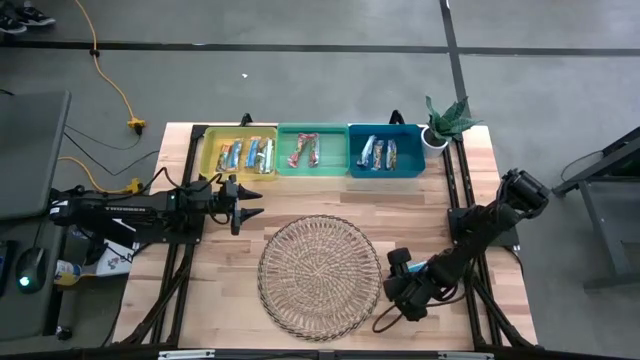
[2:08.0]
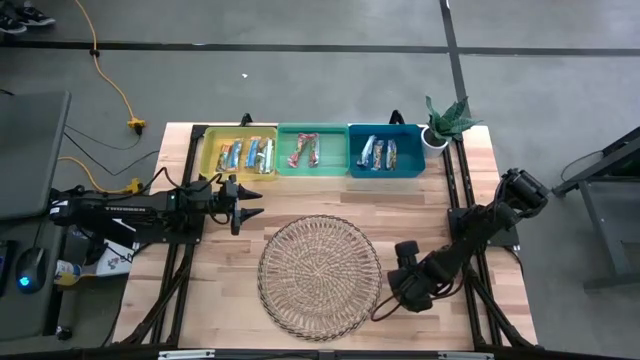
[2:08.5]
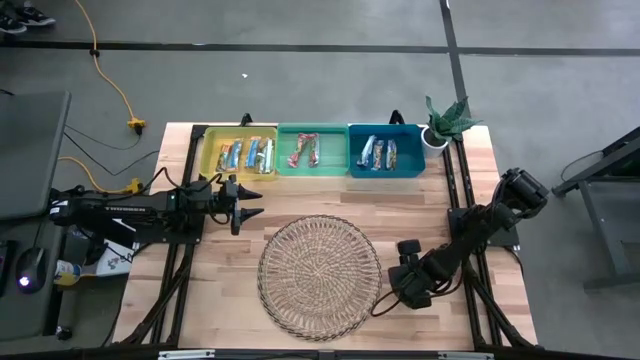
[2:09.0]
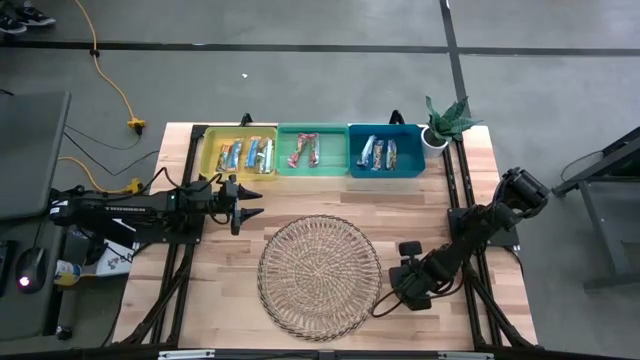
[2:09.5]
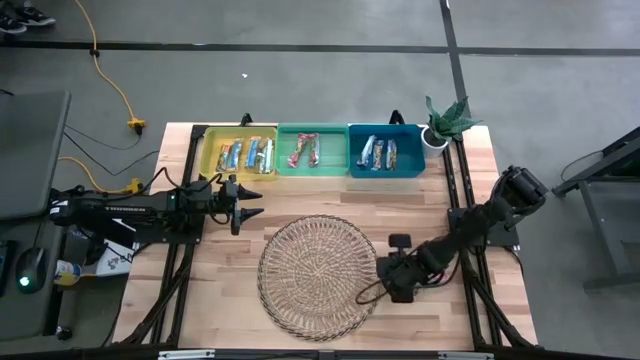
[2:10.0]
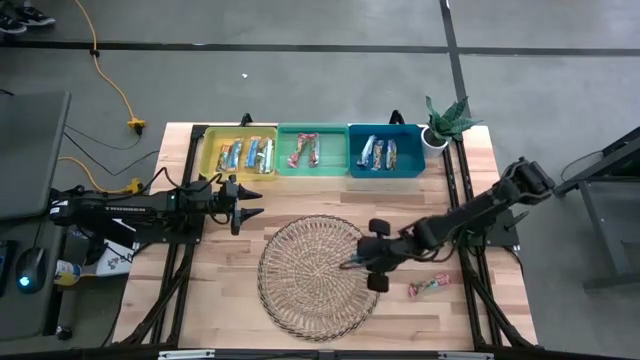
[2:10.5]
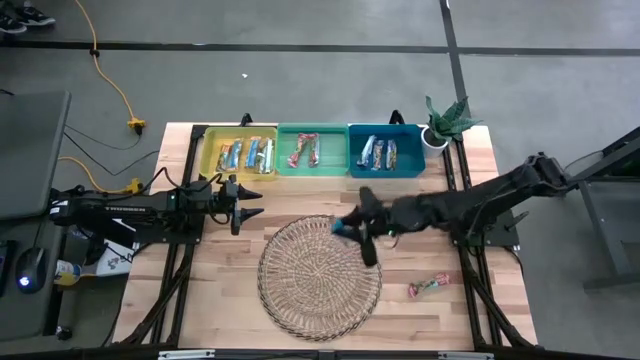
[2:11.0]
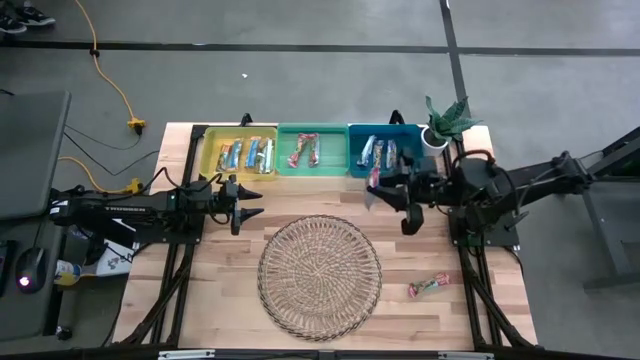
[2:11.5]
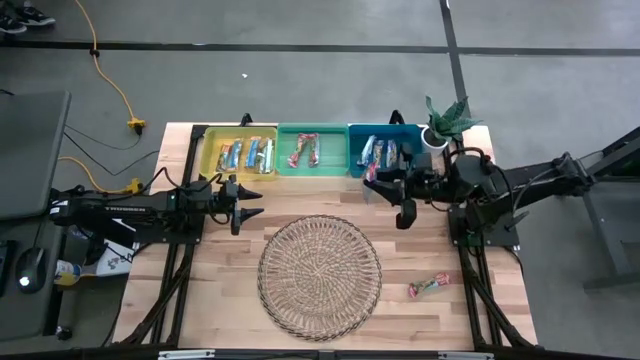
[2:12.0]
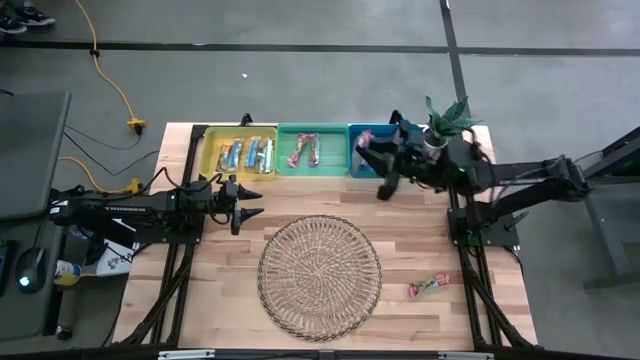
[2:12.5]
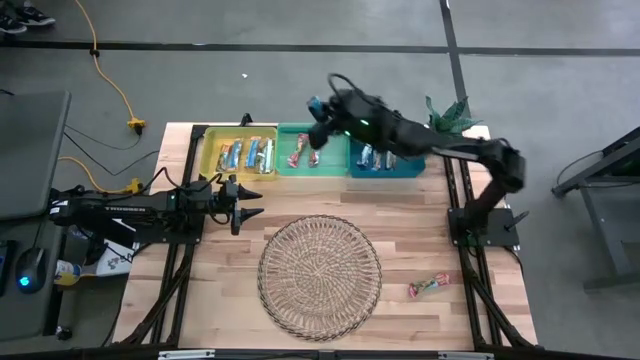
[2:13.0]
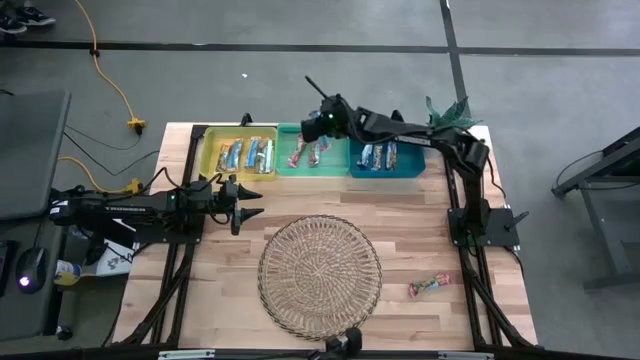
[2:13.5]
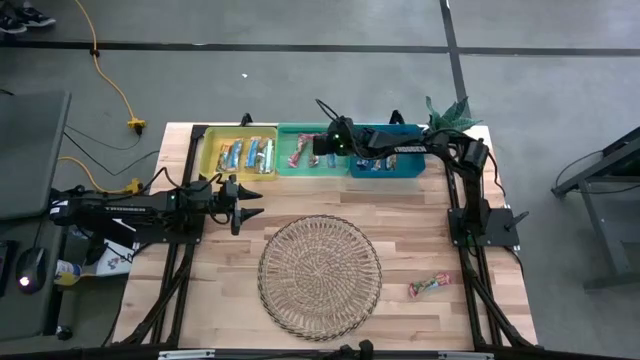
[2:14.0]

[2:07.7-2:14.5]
Task: Pick and place Granola Bars by type
Put the red granola bar into the green bin

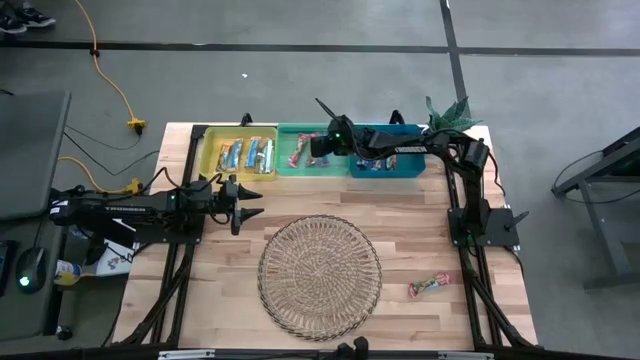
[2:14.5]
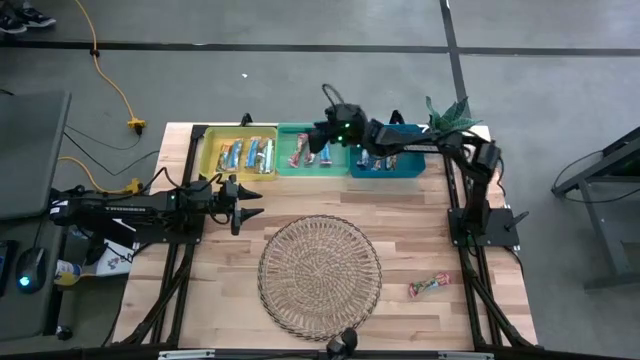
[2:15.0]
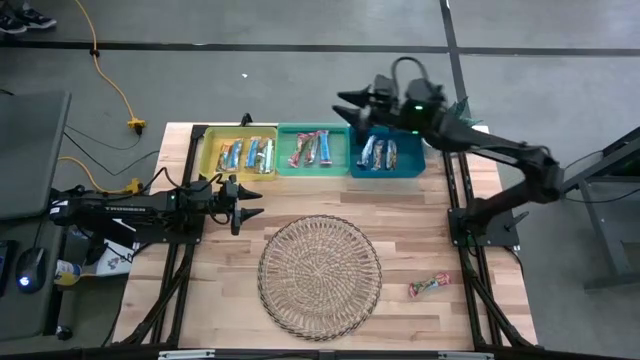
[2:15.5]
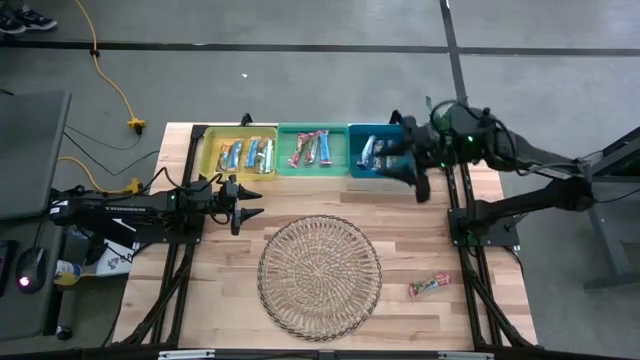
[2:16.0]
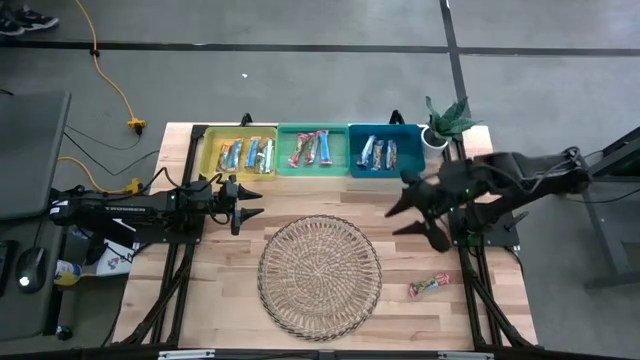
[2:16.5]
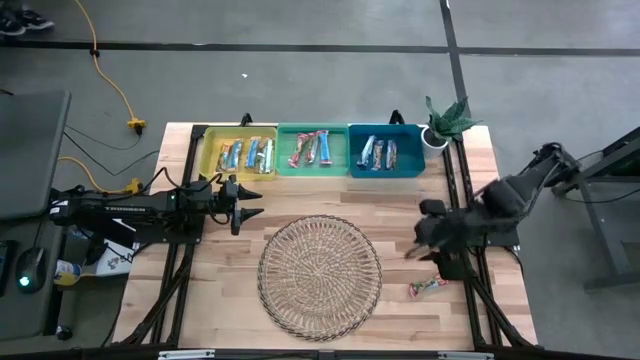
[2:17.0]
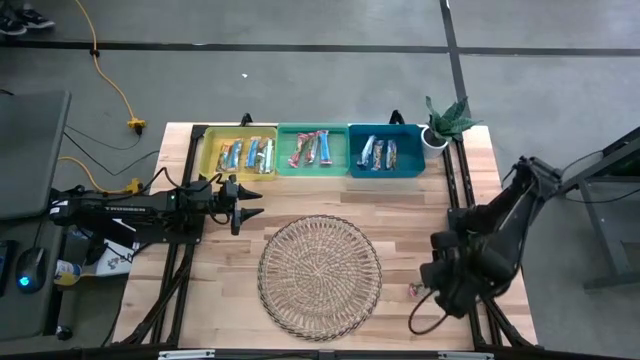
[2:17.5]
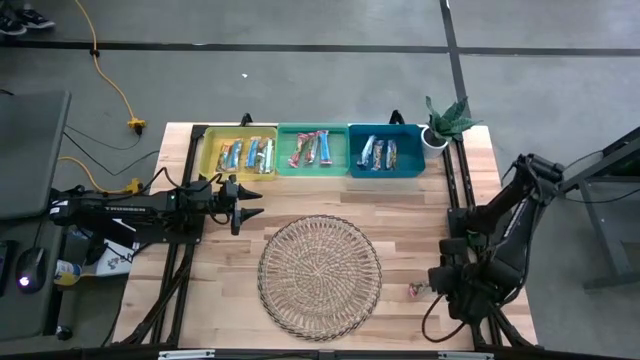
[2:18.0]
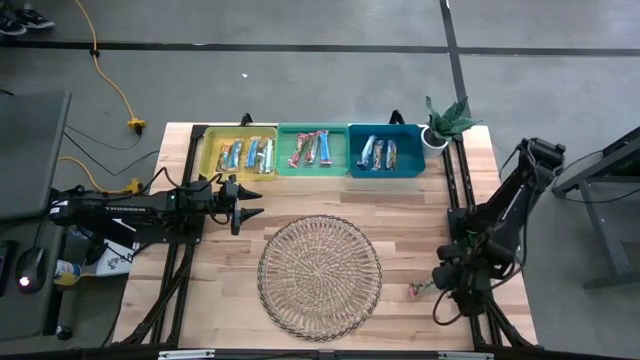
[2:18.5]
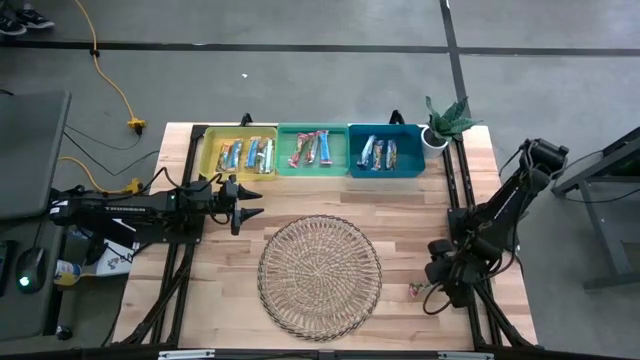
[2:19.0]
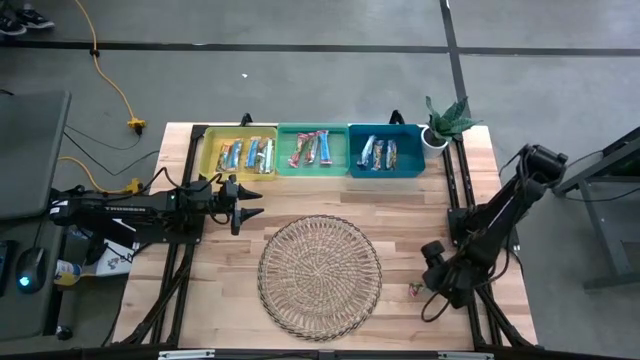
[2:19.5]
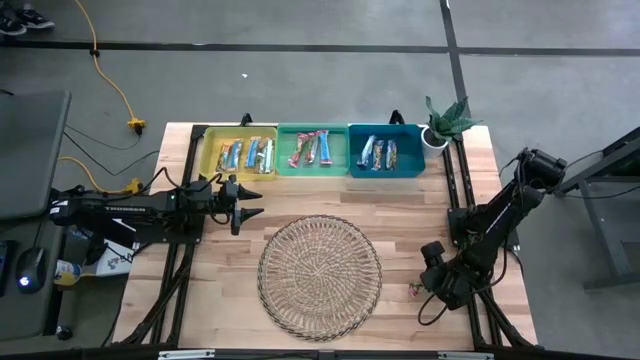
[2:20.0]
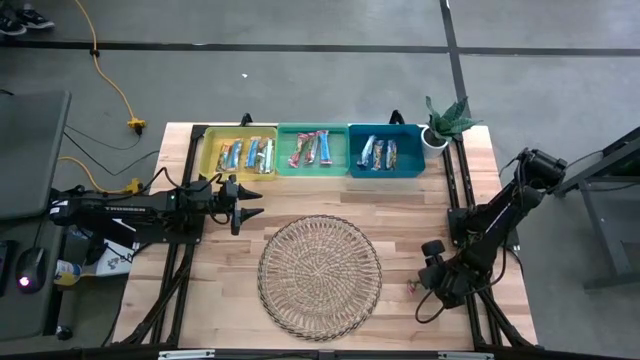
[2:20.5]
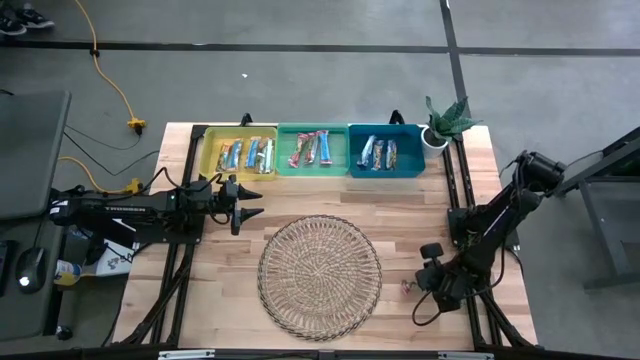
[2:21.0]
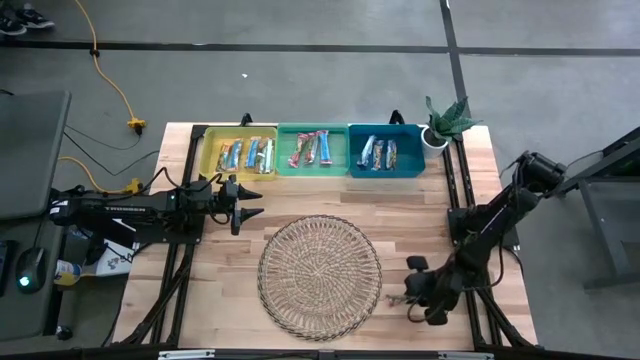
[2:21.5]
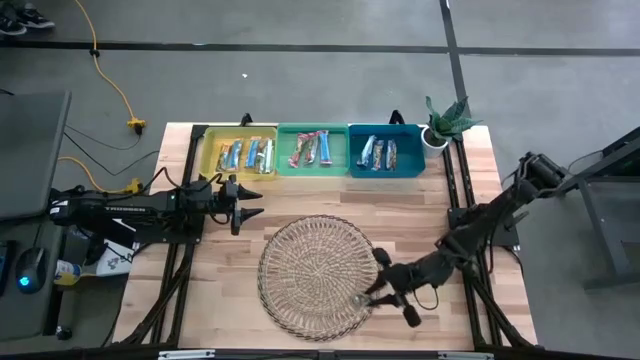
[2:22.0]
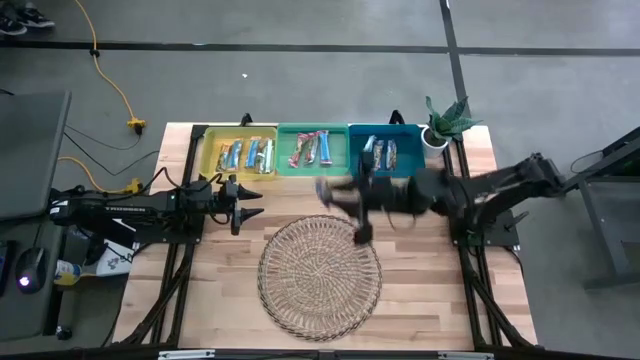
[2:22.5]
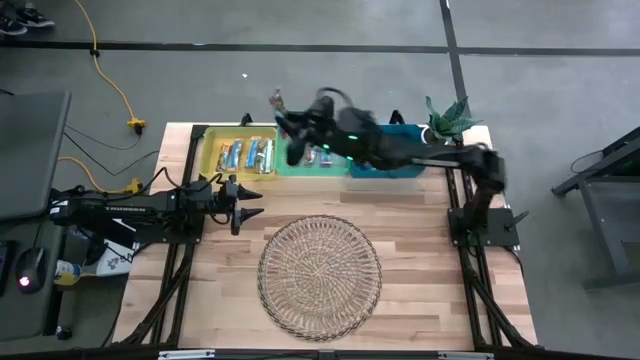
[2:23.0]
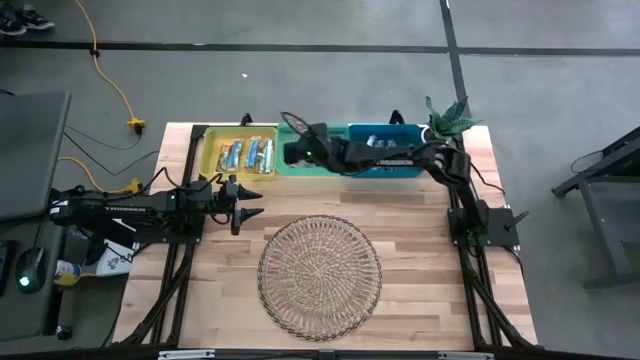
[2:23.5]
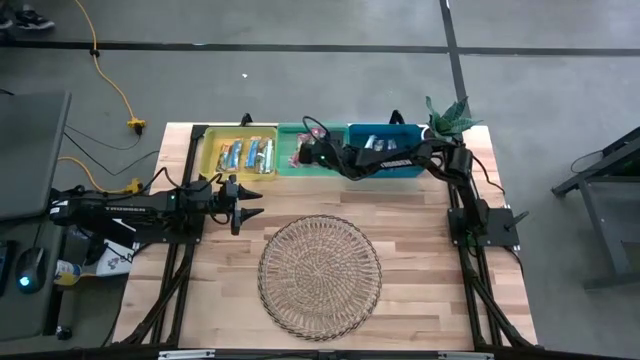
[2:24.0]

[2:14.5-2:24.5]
Put the red granola bar into the green bin

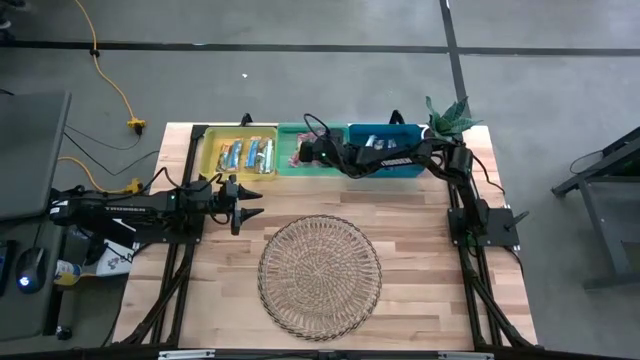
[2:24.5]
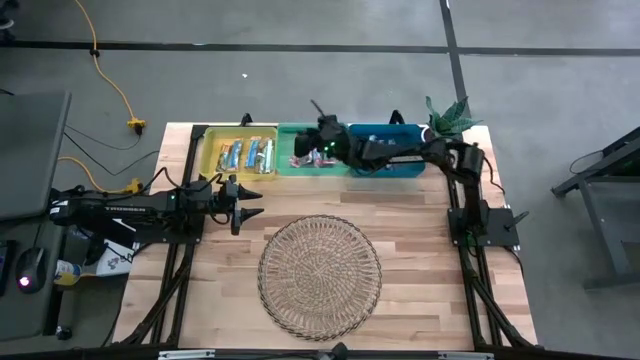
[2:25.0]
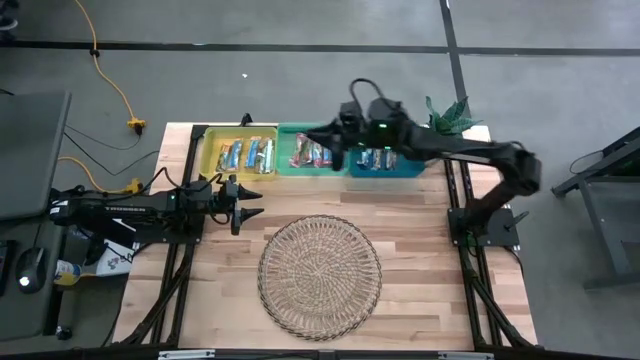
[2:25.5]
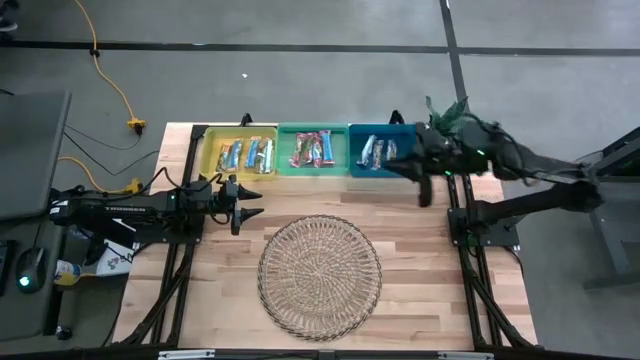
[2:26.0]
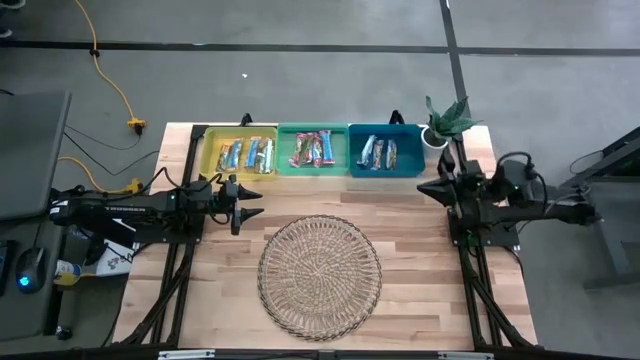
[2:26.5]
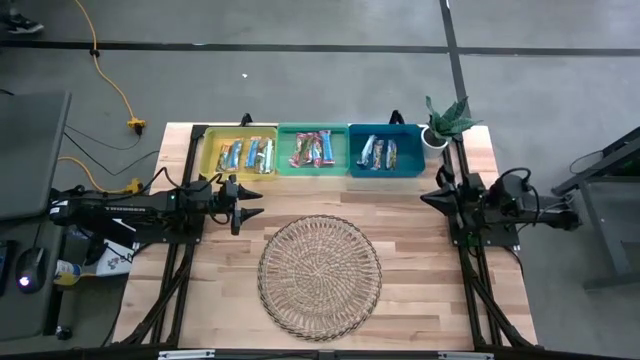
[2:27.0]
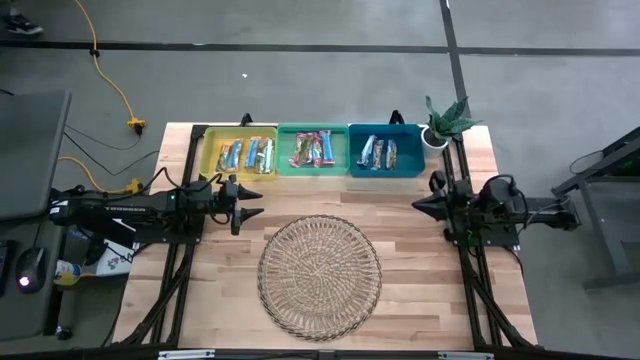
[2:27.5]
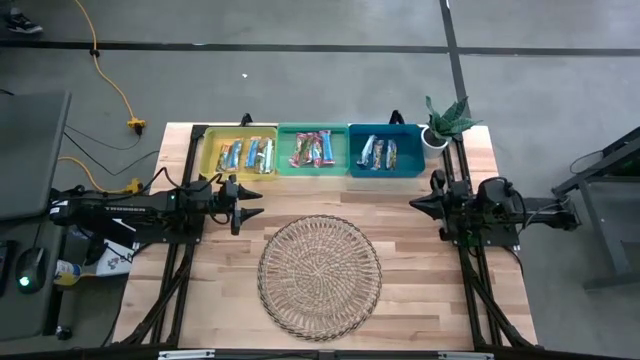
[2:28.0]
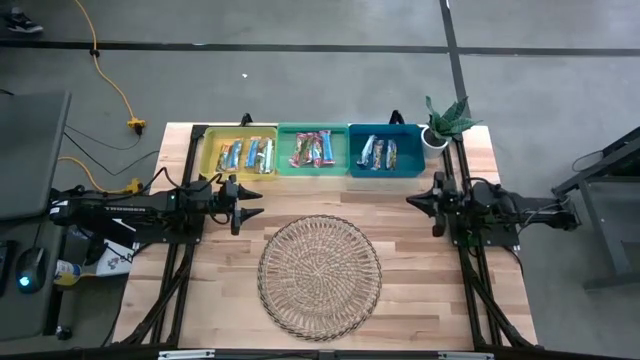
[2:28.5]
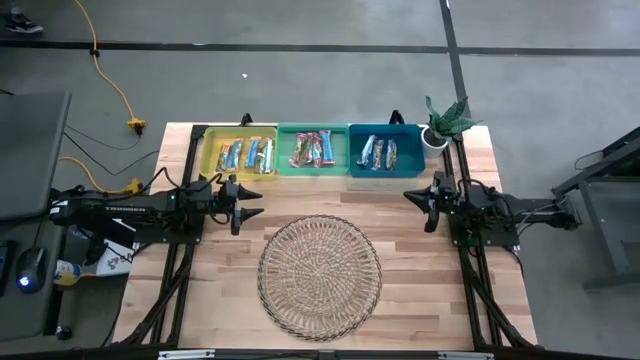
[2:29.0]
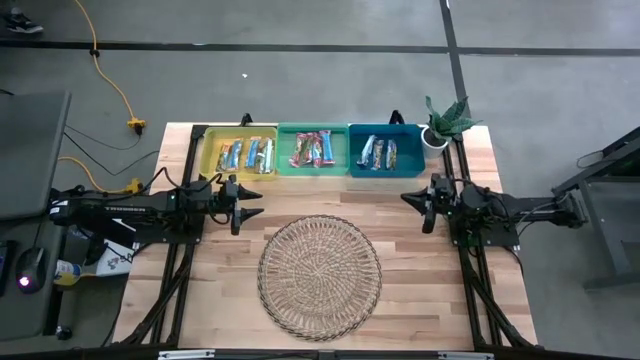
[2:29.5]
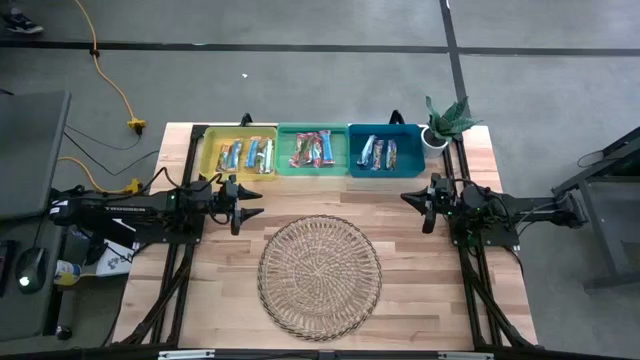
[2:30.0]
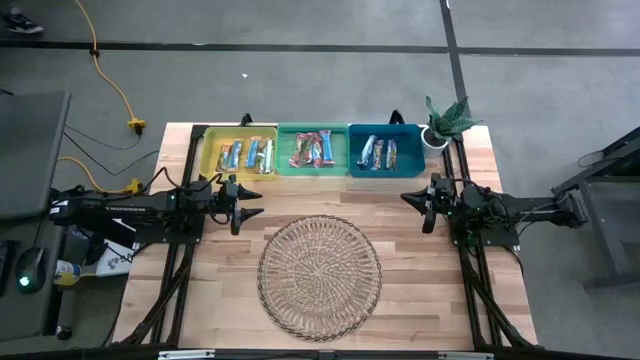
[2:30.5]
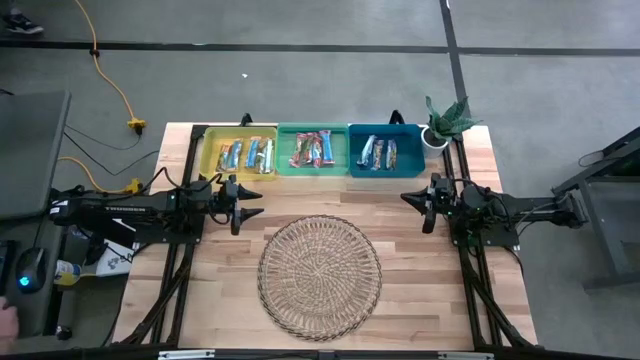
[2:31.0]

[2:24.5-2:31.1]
Return to Home position
